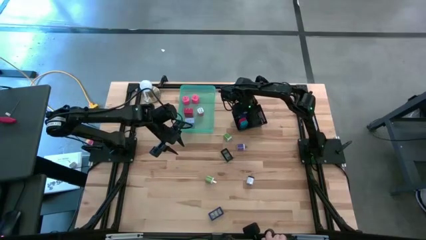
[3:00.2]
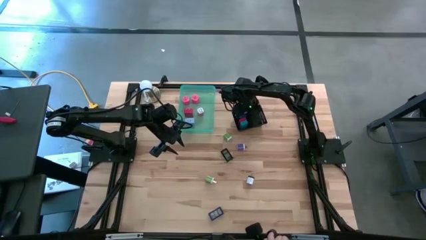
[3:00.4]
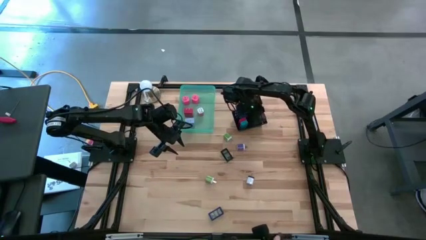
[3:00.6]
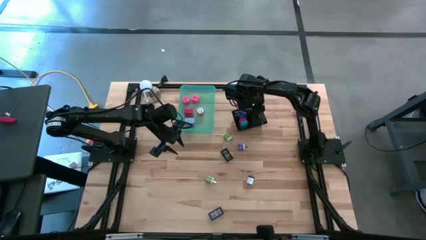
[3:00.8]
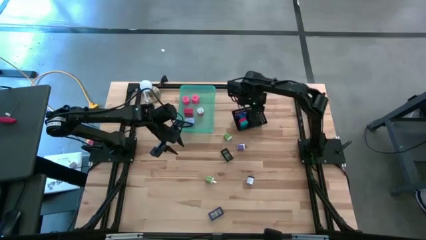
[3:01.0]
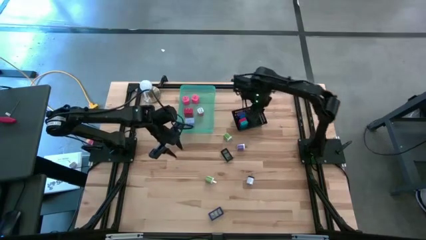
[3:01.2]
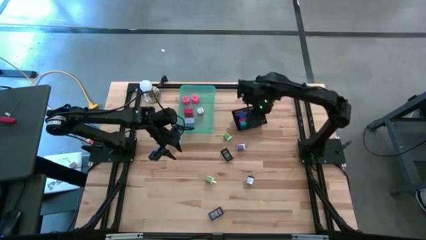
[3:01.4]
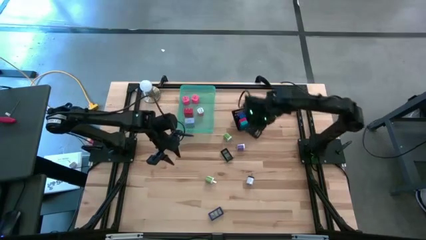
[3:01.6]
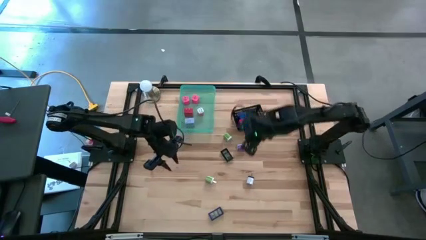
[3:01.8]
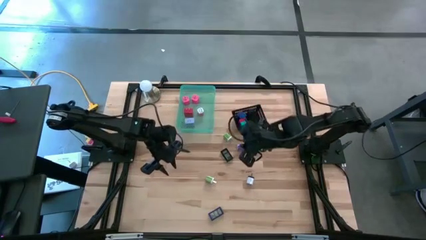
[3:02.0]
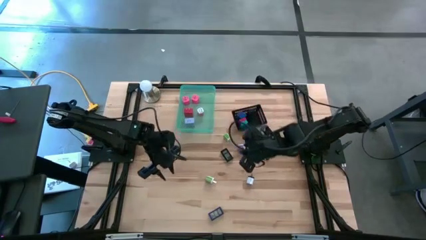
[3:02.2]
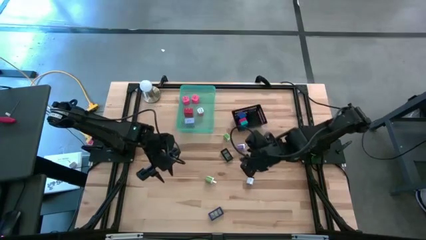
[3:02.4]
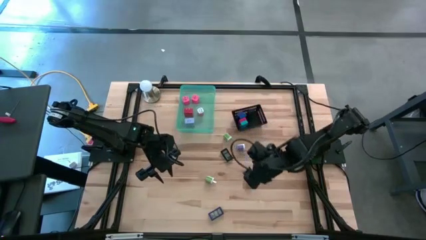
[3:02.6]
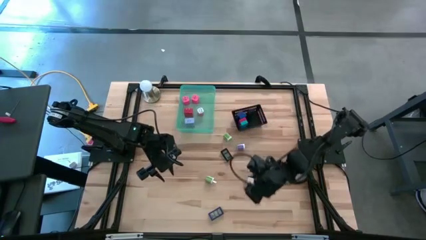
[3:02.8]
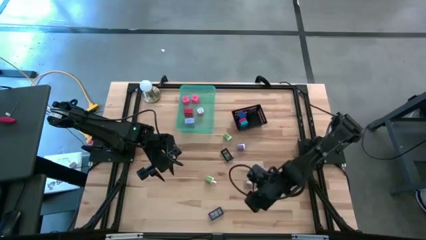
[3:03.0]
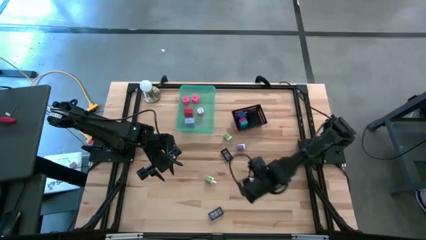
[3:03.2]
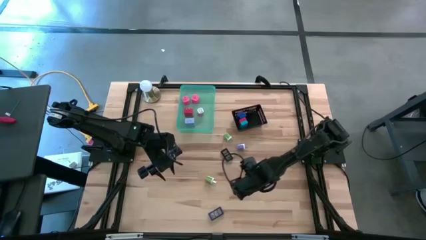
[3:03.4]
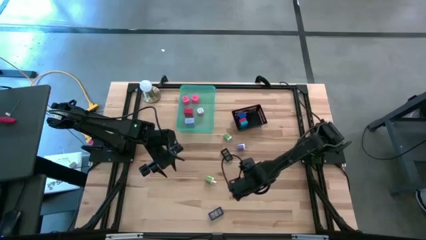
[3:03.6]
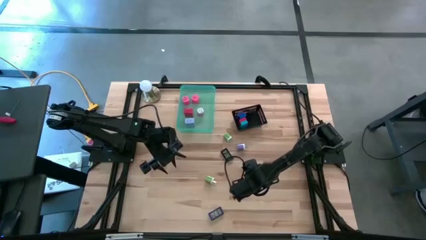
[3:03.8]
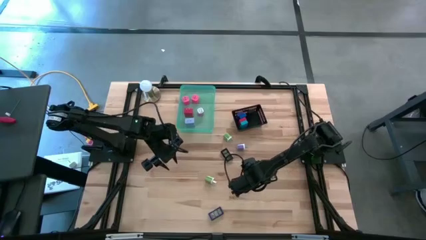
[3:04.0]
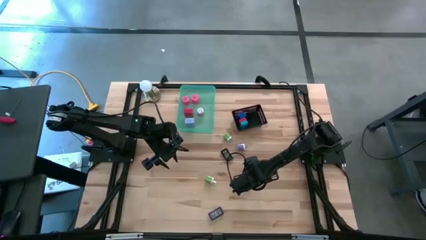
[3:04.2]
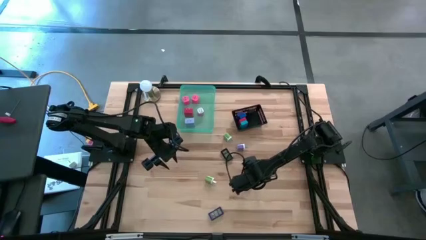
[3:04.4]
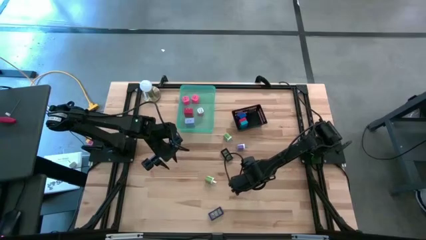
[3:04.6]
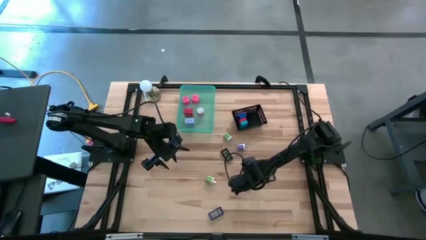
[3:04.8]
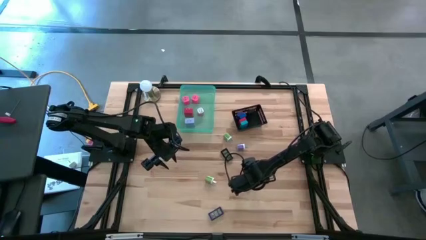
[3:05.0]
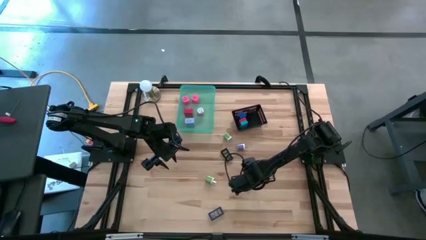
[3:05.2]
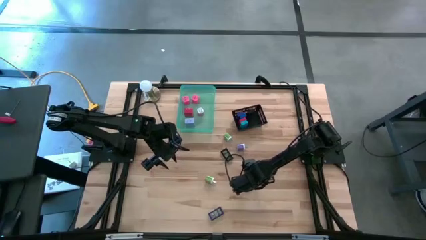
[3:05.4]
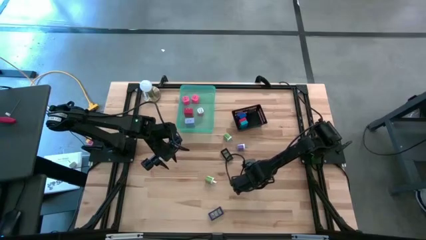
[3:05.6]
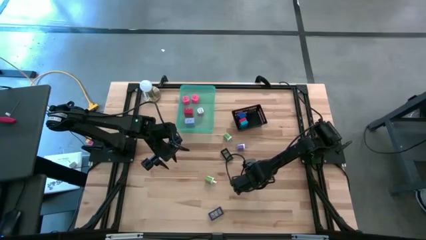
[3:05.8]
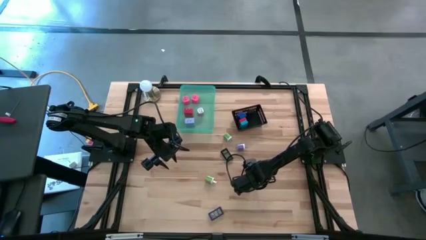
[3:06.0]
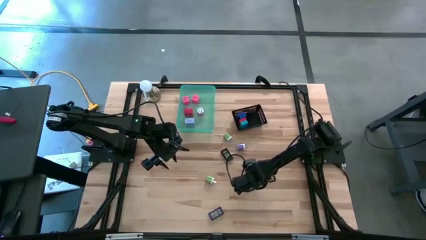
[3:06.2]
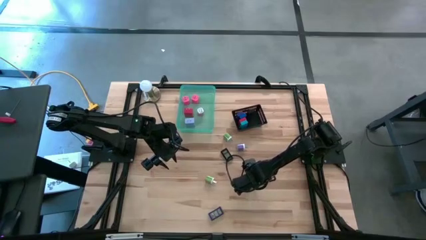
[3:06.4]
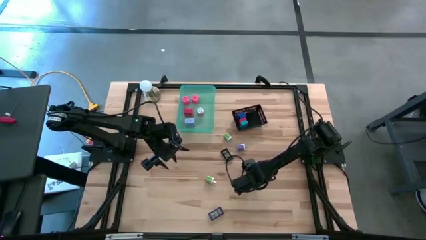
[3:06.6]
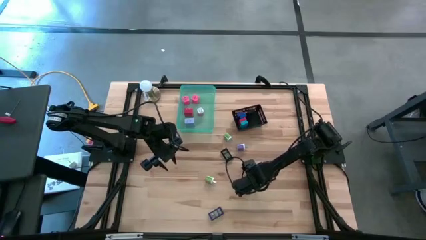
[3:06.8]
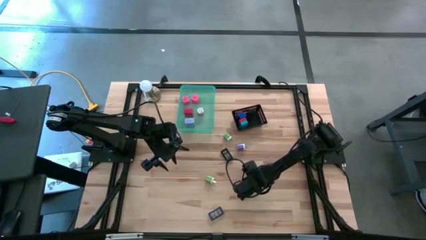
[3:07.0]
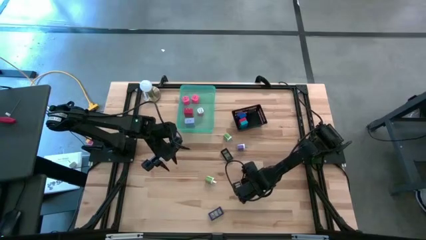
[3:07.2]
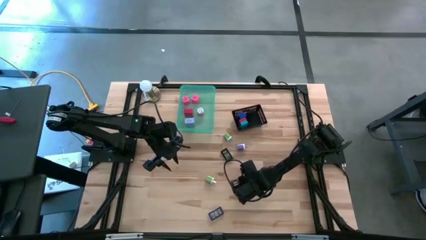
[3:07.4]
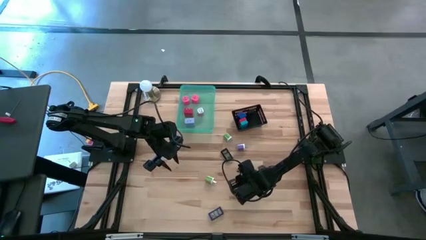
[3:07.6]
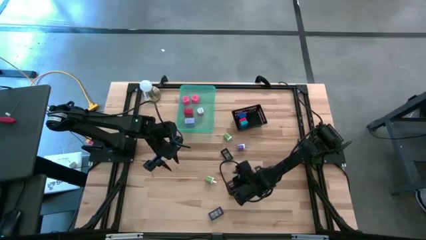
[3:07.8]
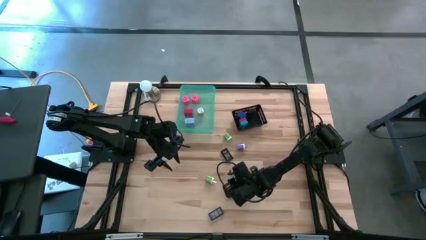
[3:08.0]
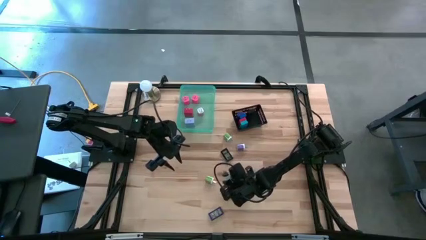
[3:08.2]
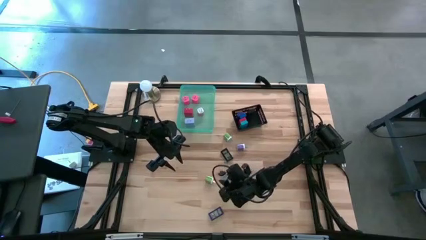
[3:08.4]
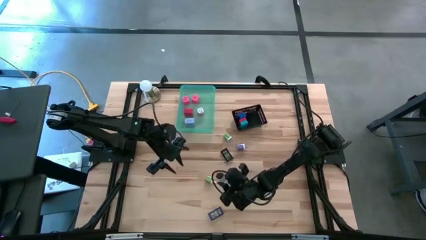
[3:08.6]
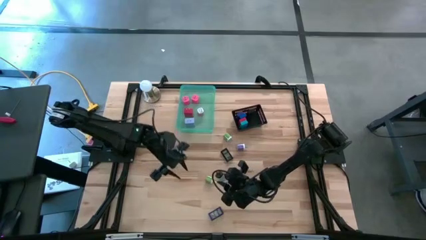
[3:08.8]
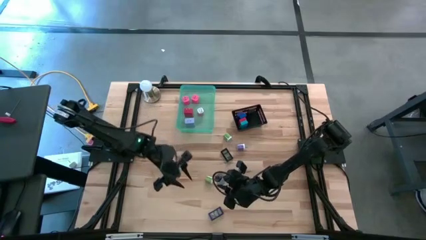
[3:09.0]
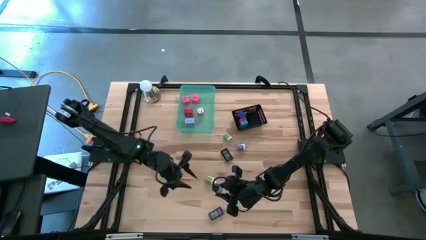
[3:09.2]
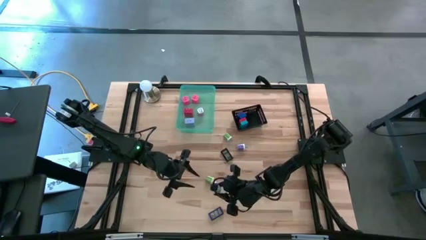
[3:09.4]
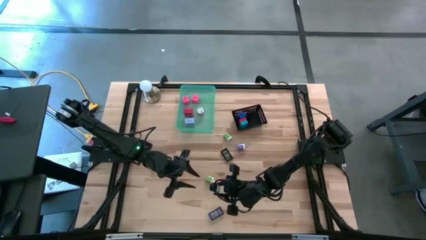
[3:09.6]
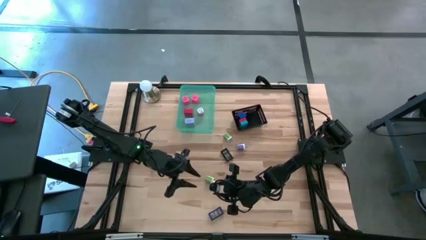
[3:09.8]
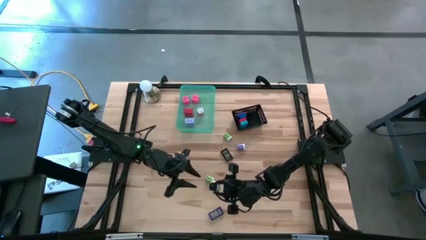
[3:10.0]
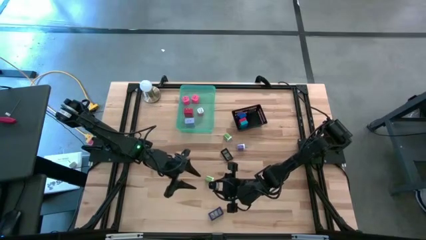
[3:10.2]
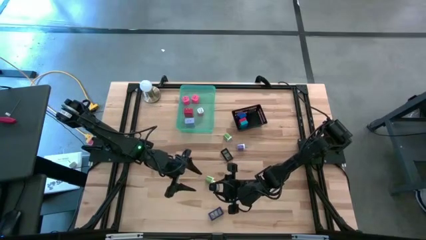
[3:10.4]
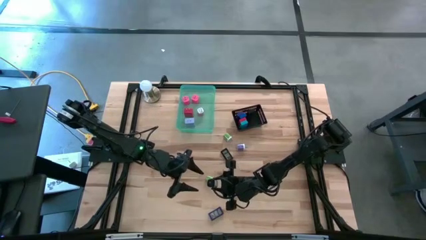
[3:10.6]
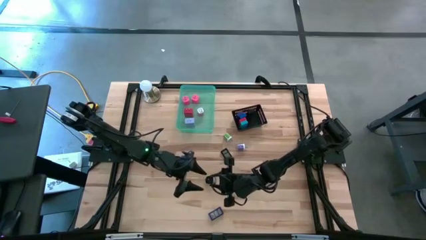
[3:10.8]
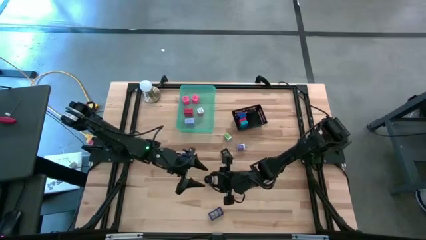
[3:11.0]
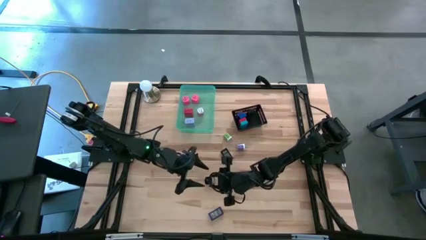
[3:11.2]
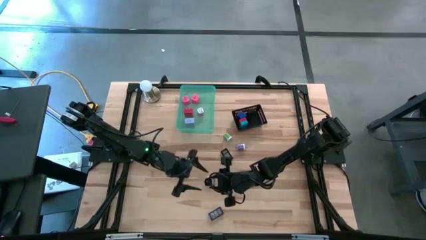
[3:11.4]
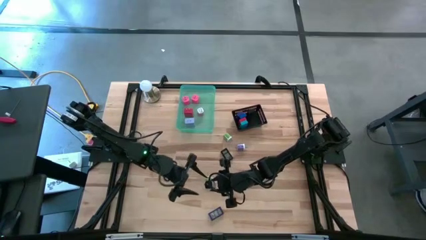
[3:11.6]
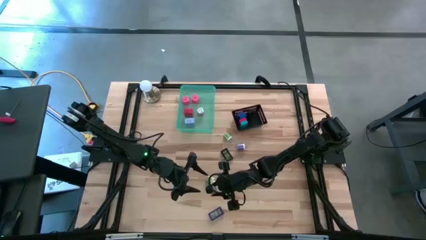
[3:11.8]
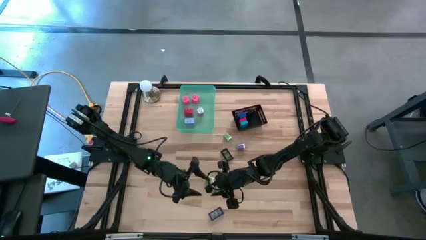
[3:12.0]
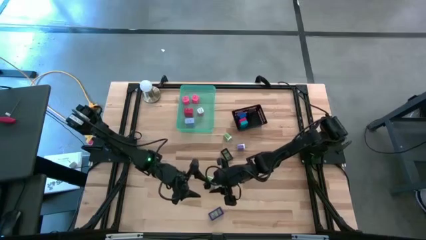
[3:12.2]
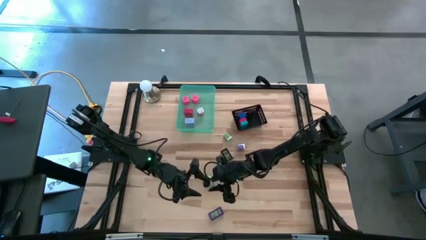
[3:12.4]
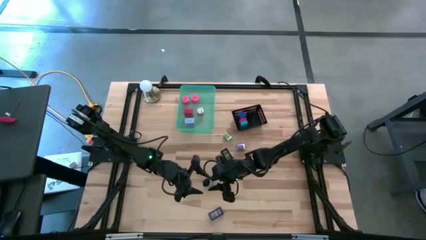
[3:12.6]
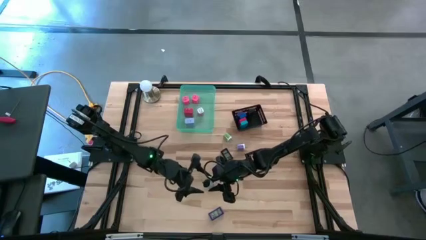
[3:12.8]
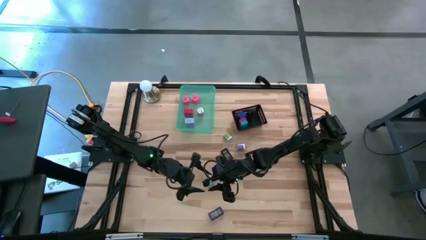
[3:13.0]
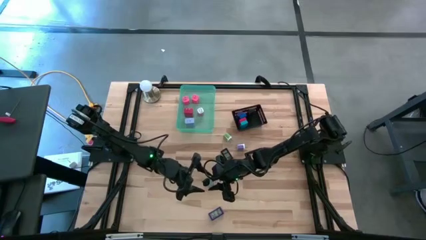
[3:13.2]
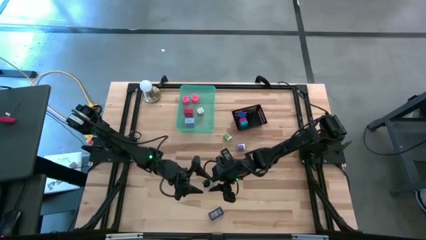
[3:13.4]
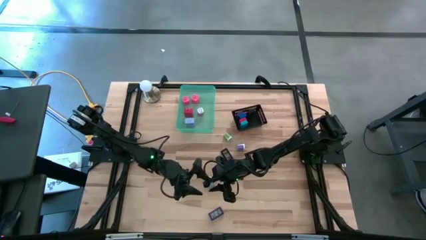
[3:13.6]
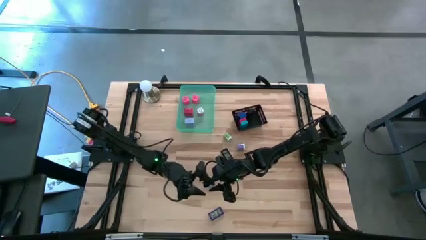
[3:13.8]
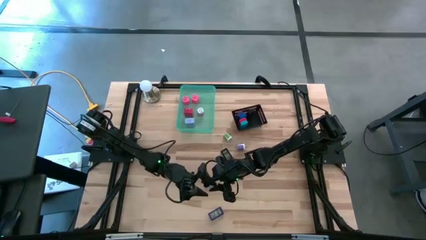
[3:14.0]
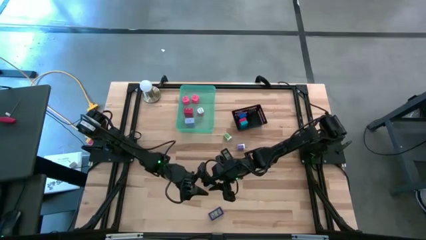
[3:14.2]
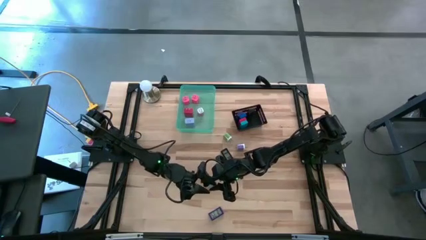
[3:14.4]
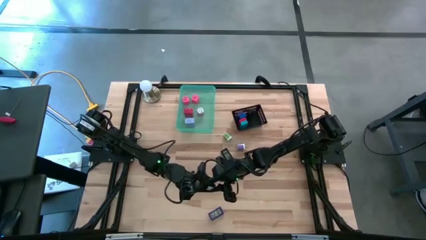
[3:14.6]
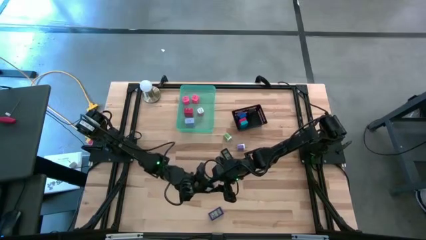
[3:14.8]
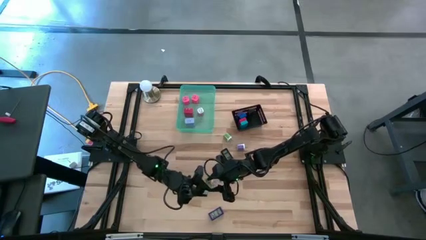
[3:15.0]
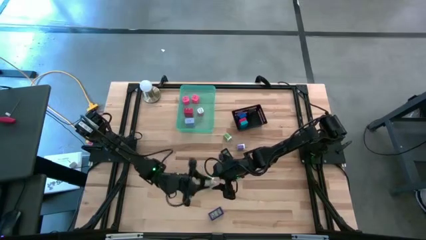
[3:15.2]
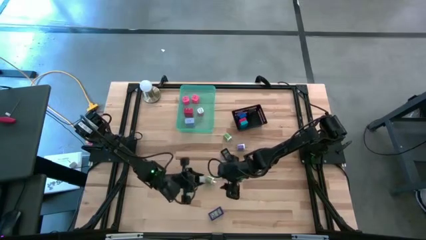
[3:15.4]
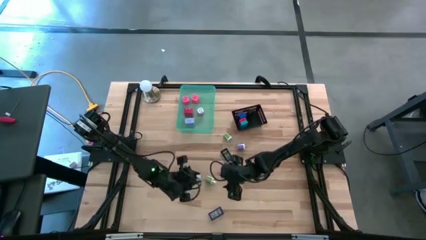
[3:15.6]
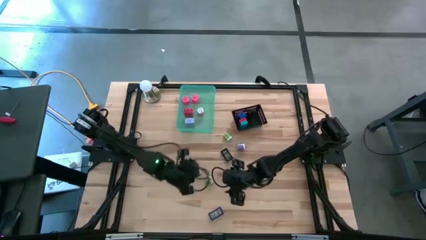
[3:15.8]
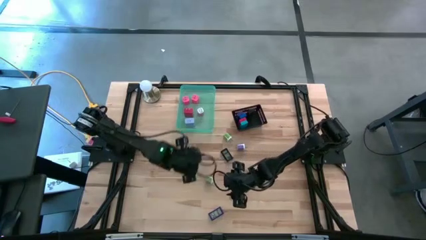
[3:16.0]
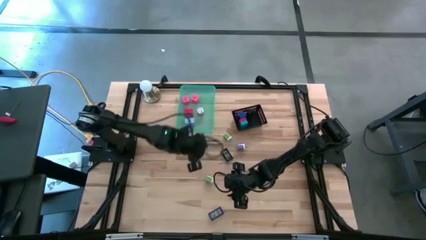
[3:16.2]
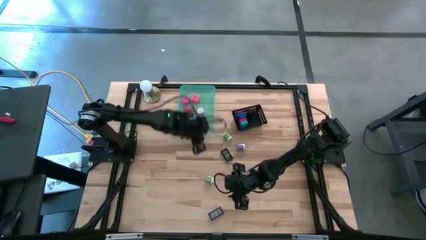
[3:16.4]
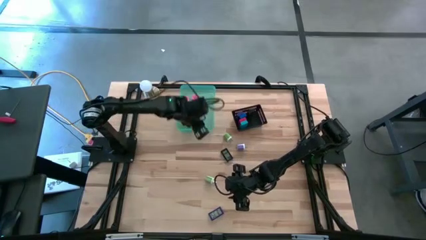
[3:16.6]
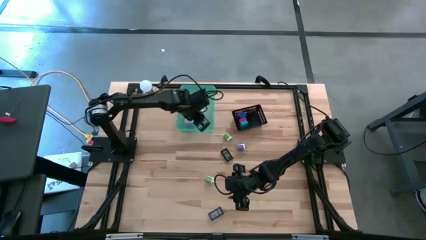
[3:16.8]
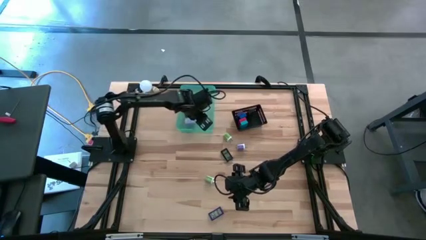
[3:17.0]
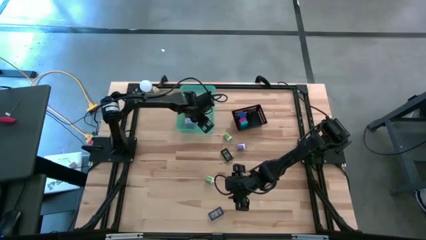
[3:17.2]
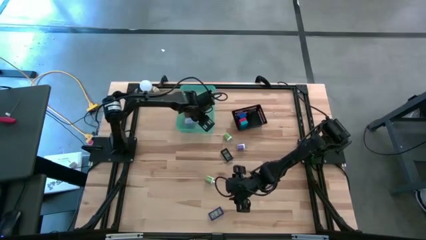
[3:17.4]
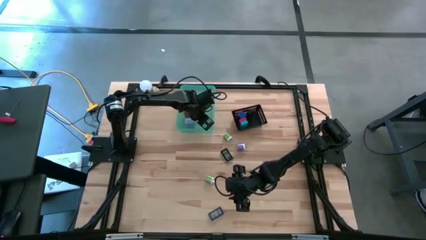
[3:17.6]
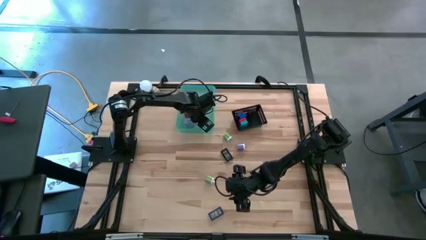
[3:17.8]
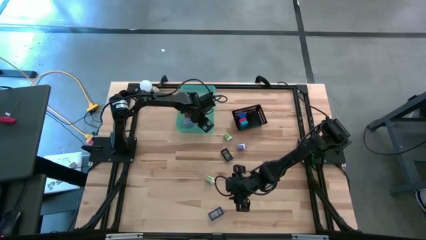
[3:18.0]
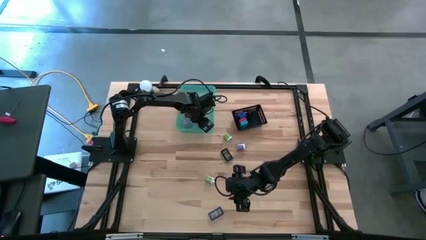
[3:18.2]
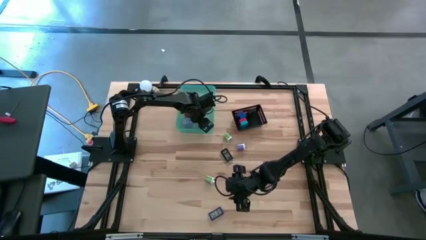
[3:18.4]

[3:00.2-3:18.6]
Task: Pick & Place Office items
Put the black white charger adapter into the green bin
